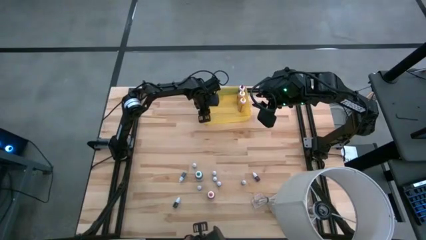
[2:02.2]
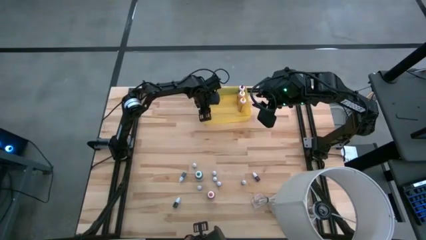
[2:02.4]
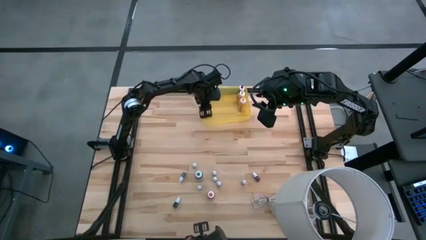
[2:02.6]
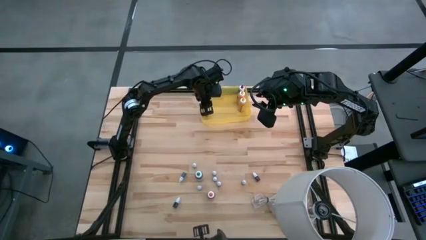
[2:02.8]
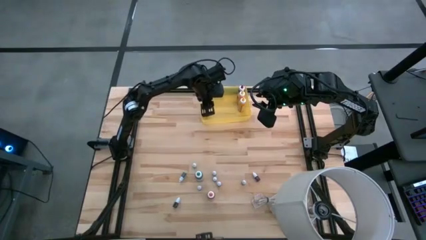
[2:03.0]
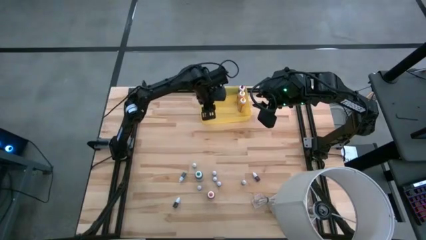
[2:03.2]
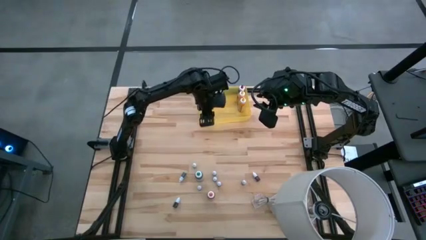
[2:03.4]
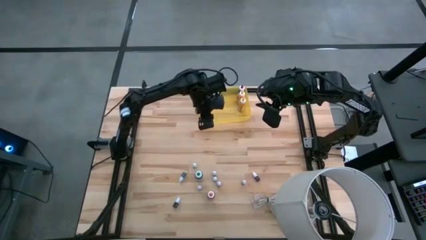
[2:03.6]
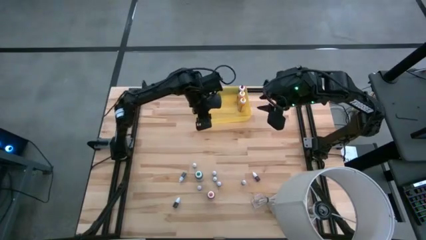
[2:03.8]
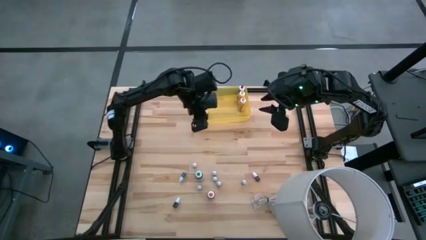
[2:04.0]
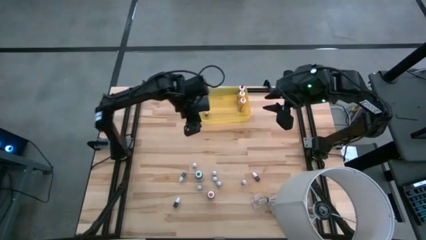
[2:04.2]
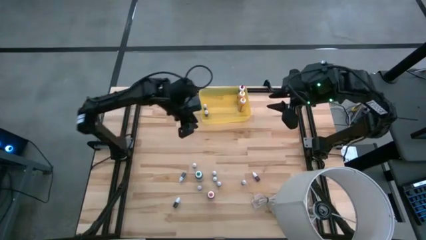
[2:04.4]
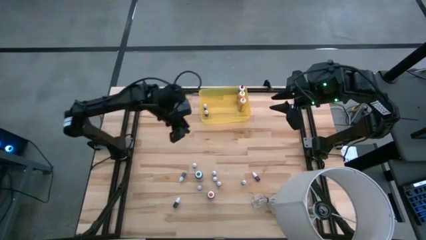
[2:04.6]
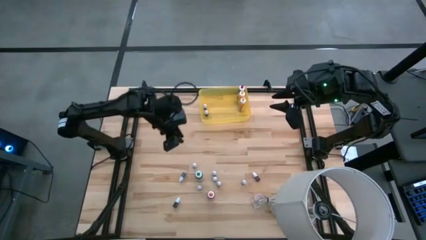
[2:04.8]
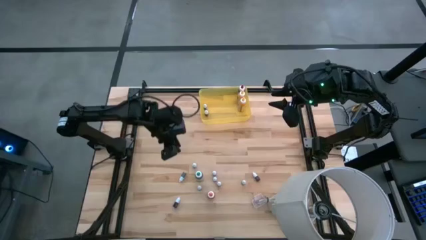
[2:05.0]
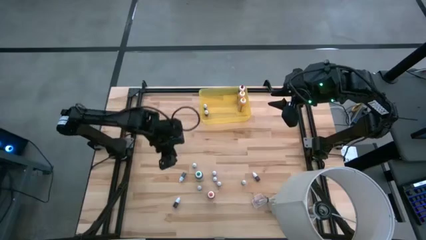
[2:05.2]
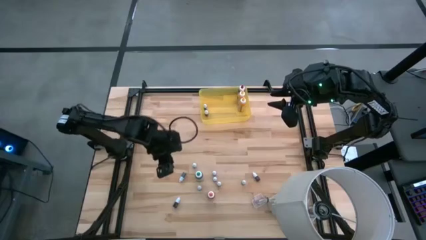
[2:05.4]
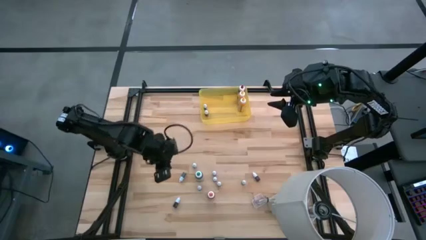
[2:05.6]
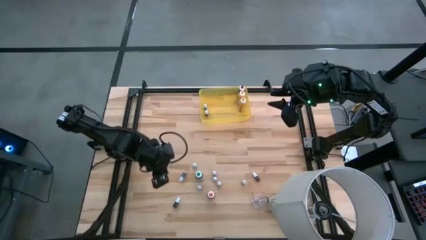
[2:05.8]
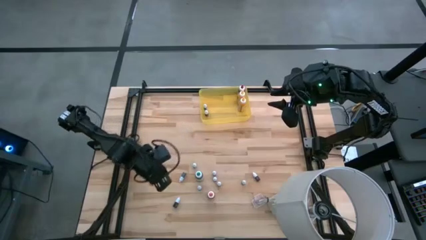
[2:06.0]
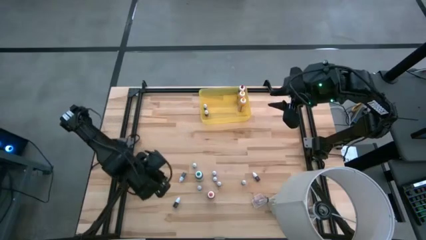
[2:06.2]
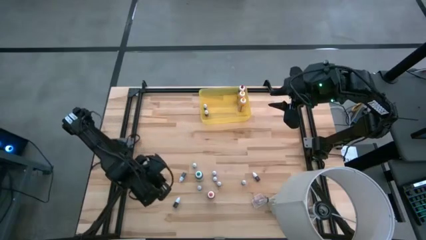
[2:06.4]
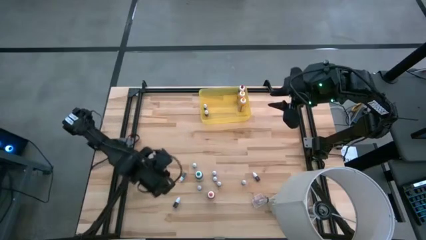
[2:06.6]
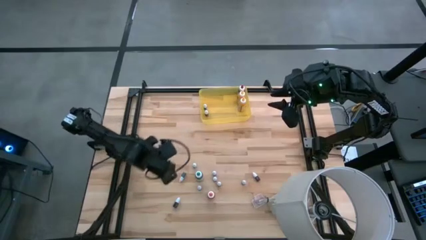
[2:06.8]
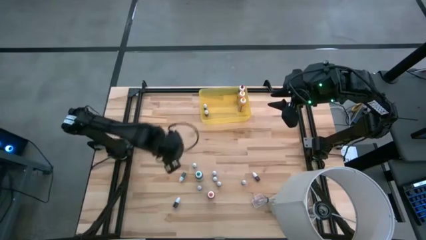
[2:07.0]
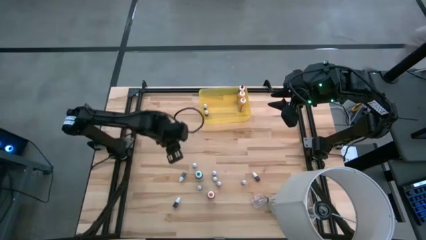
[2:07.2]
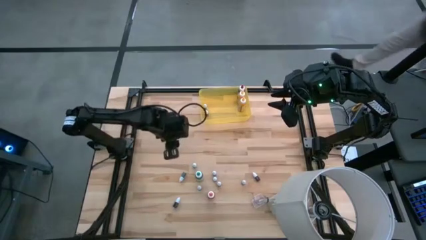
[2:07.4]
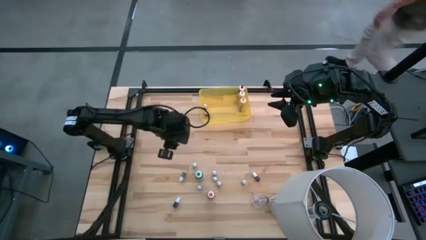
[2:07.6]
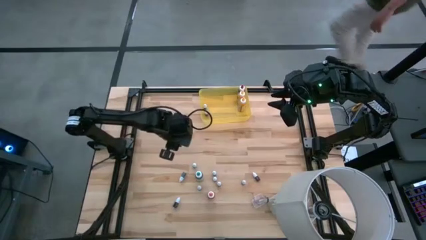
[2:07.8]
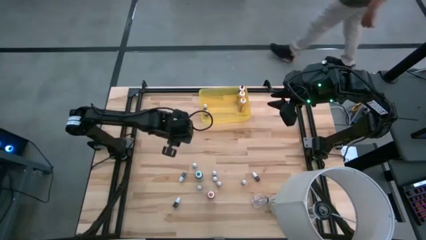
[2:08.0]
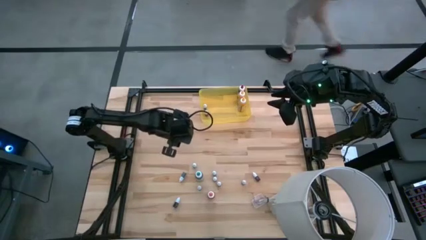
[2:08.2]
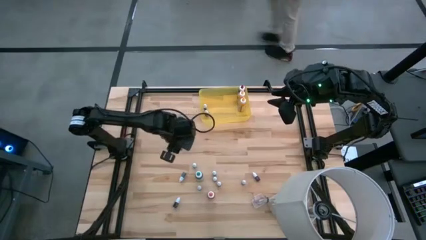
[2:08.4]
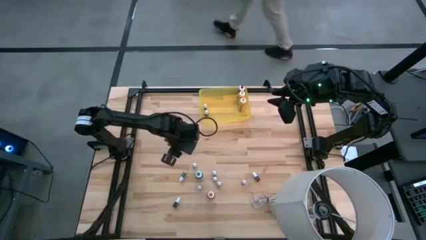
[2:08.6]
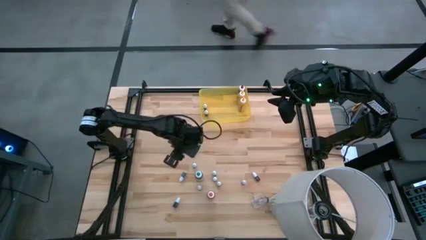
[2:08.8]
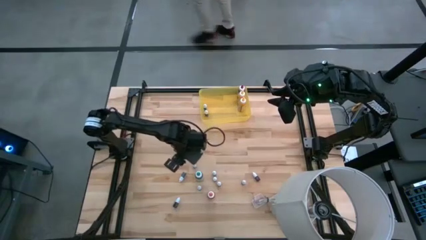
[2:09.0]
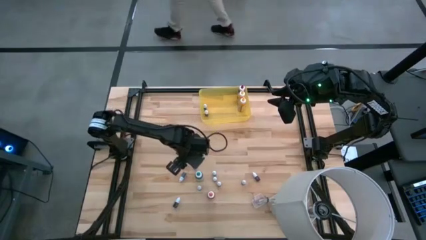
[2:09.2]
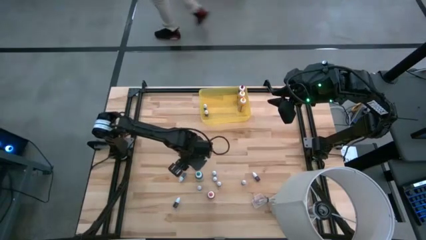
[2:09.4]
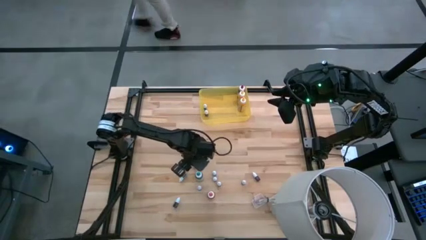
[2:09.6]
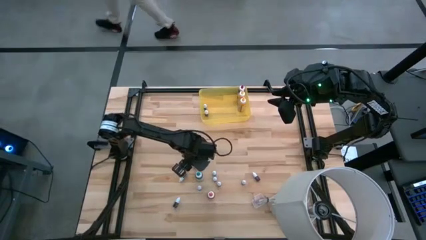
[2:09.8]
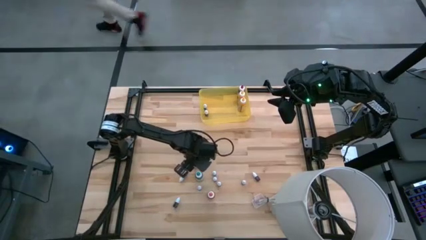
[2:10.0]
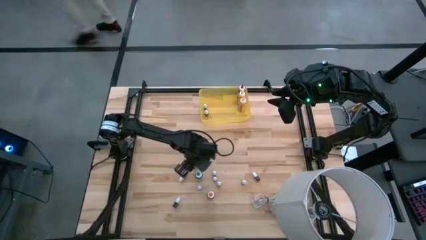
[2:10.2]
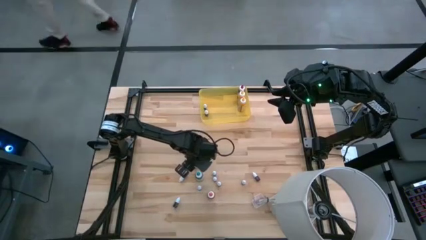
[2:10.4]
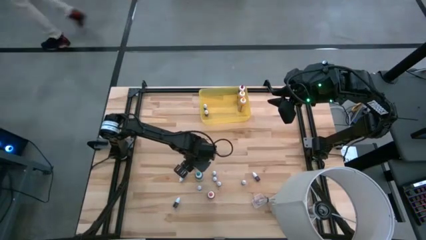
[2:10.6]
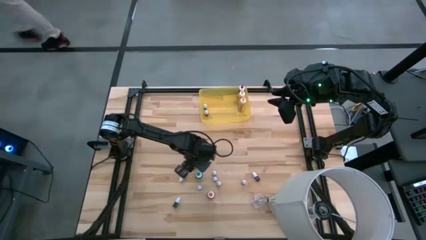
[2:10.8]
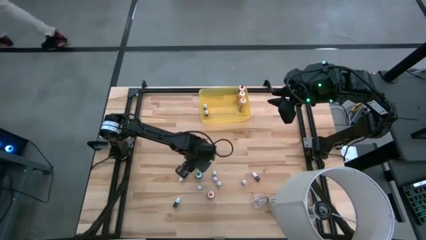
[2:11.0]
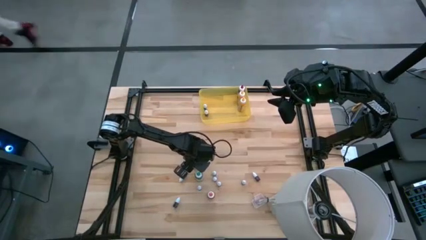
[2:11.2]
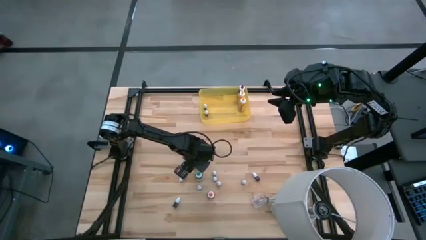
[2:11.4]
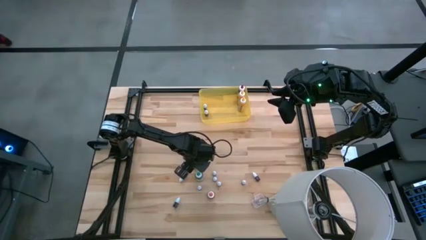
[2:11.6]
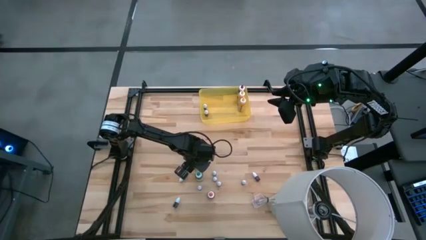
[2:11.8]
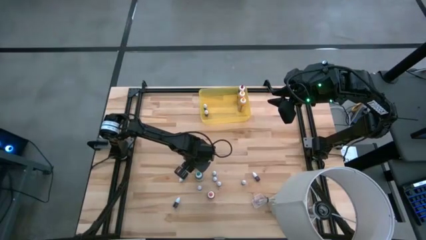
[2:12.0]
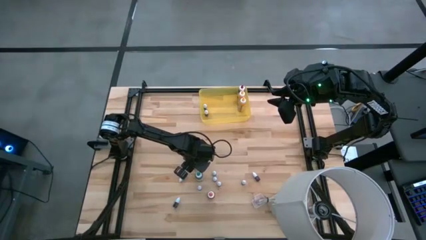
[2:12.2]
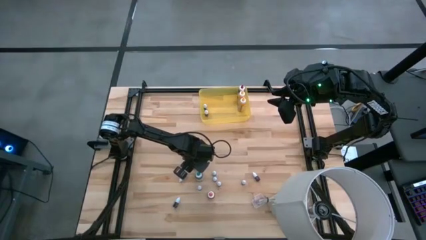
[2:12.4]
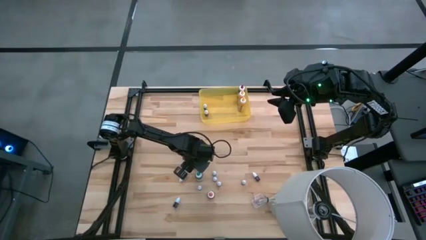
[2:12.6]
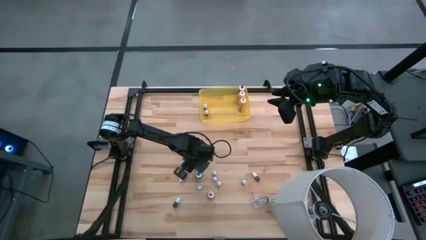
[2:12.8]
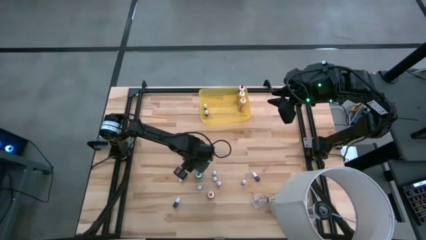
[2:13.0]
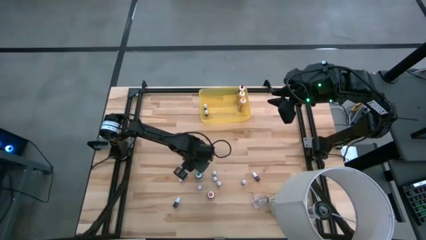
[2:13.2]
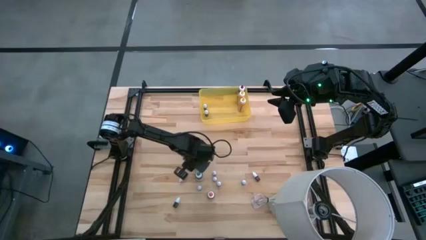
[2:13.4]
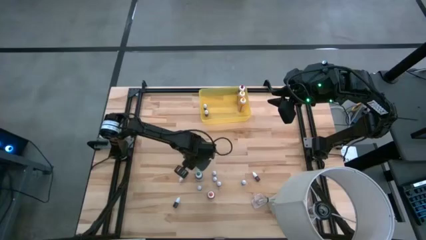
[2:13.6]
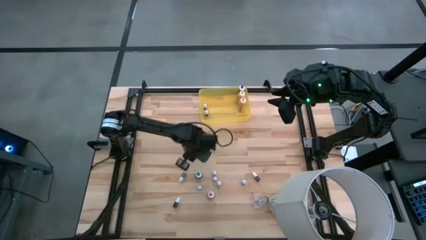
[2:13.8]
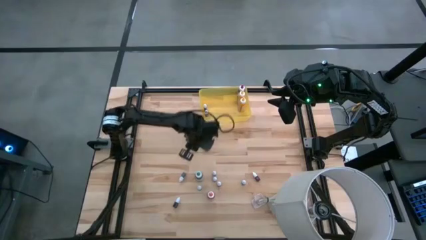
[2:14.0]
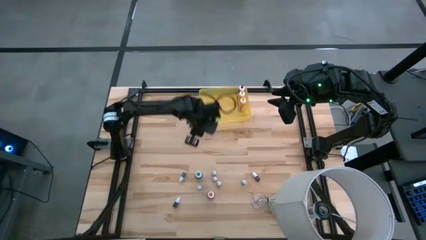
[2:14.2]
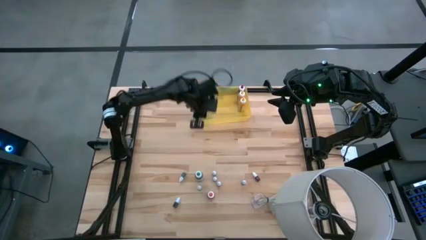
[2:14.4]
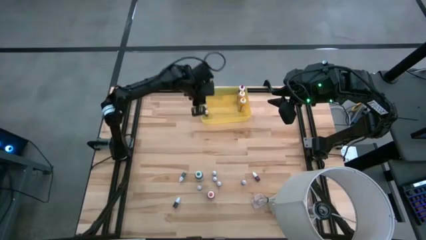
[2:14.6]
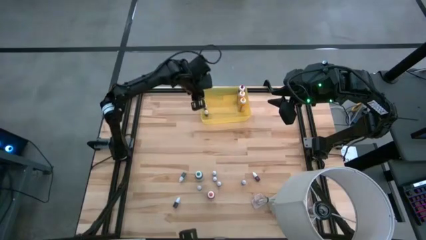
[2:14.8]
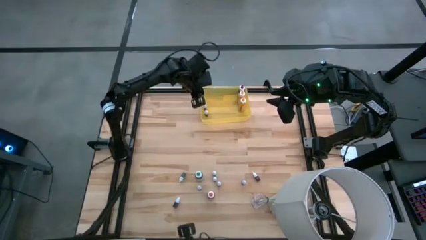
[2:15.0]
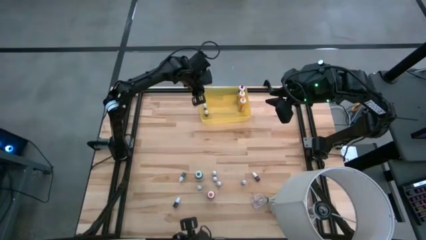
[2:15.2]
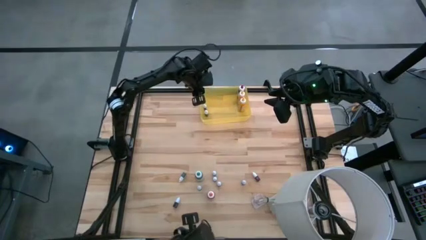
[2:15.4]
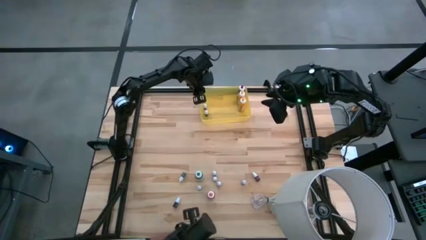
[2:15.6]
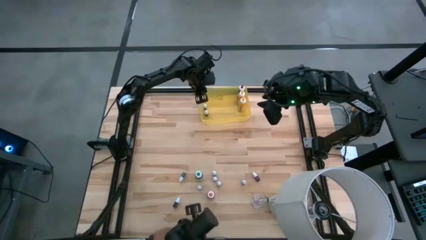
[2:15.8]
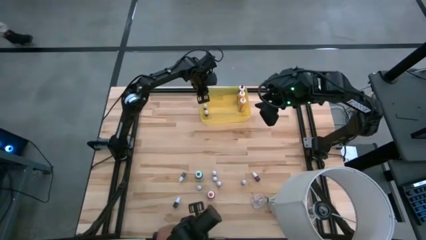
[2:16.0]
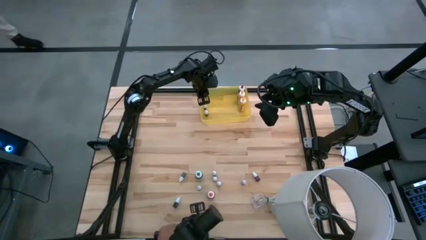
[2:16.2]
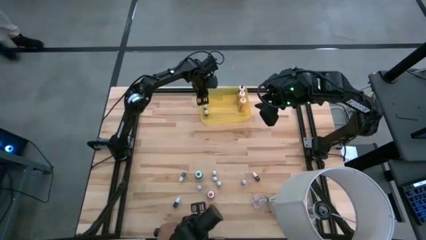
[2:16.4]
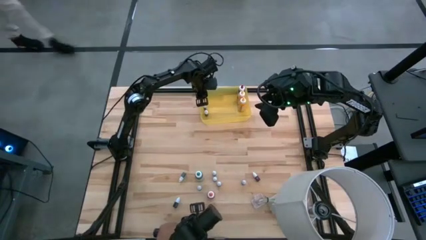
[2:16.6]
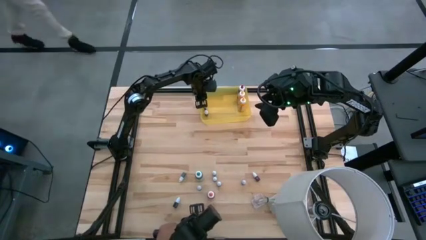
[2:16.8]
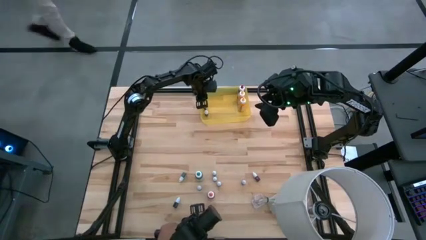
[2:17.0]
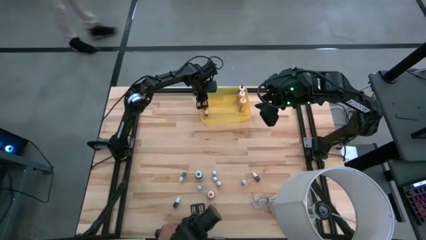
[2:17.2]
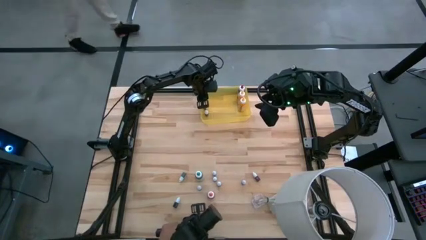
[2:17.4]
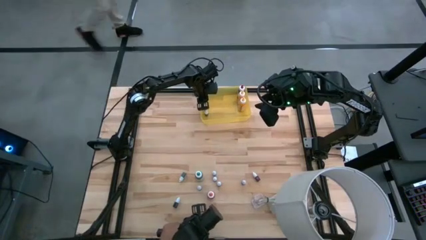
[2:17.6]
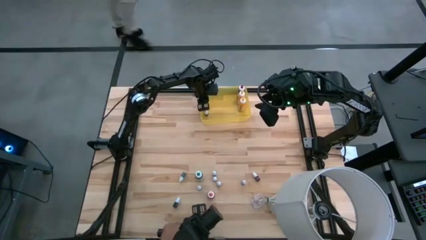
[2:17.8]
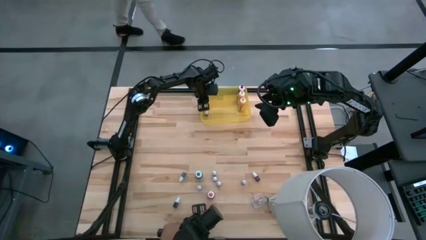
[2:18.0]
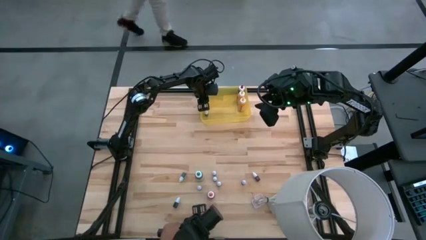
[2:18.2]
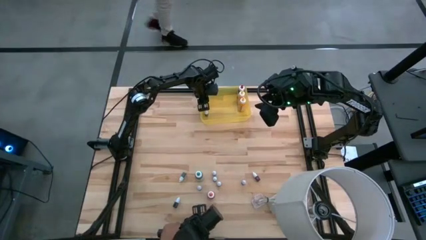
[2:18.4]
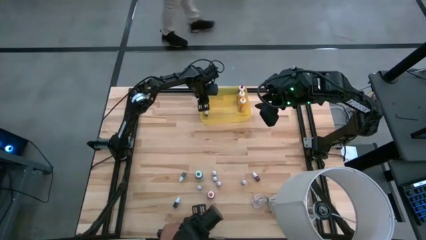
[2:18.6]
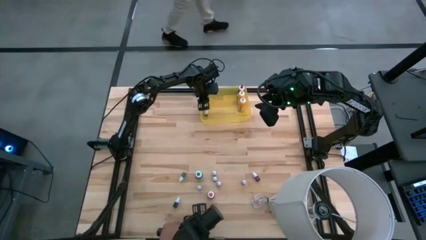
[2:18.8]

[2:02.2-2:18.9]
Task: Pick & Place food coloring
Put the small dark green food coloring bottle into the yellow bin
